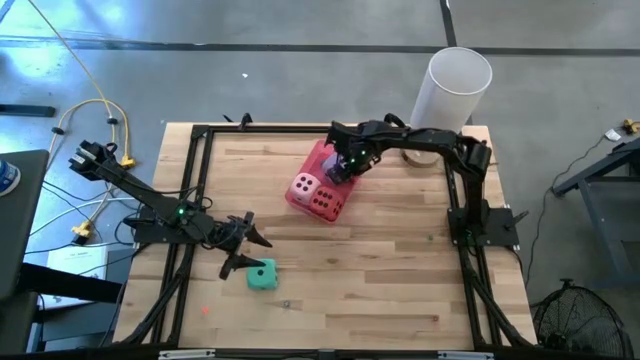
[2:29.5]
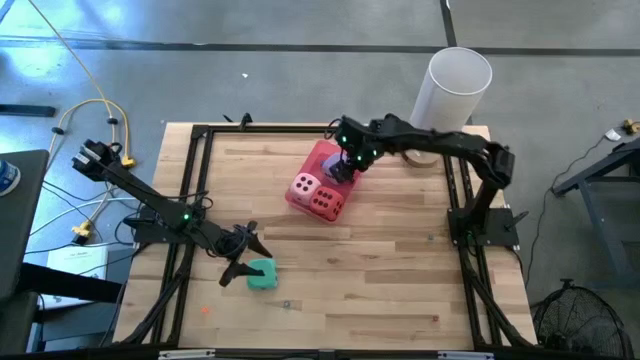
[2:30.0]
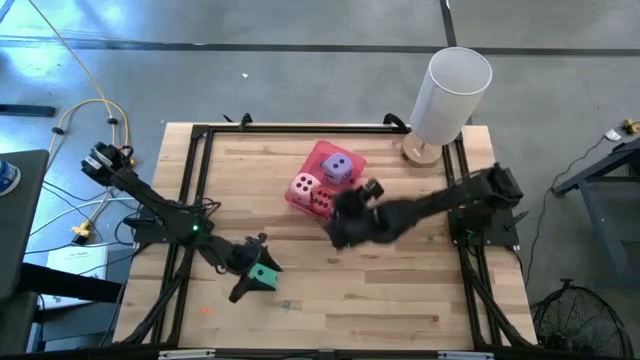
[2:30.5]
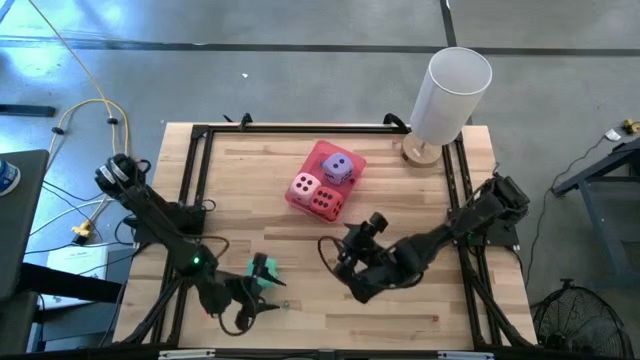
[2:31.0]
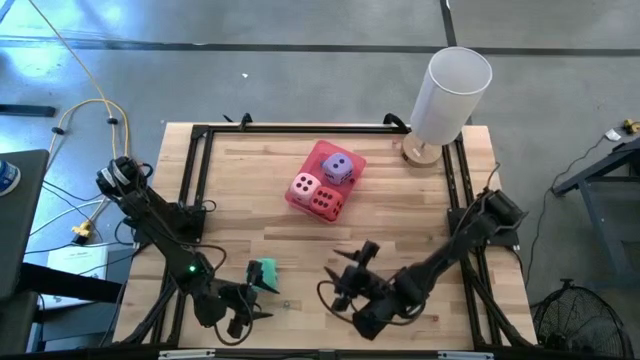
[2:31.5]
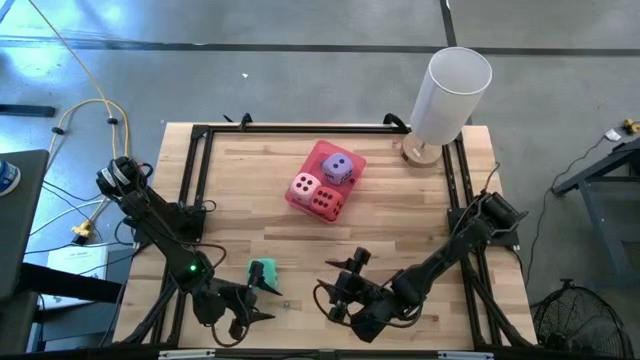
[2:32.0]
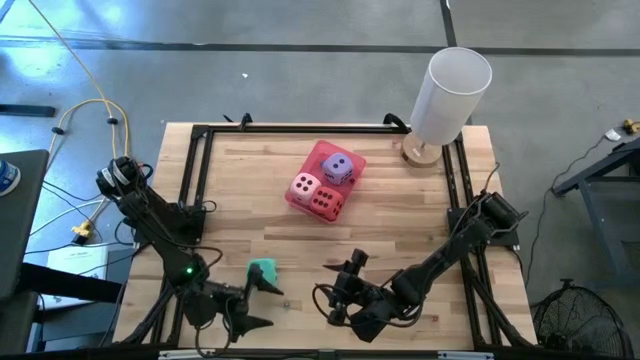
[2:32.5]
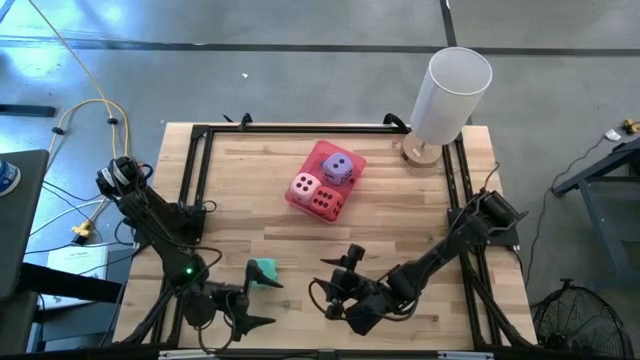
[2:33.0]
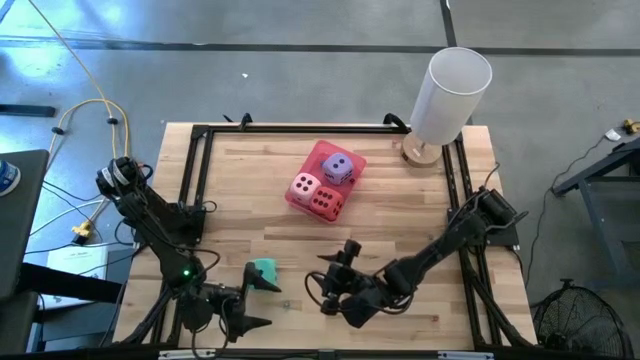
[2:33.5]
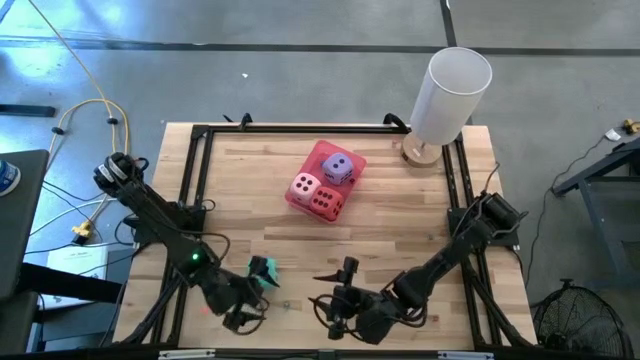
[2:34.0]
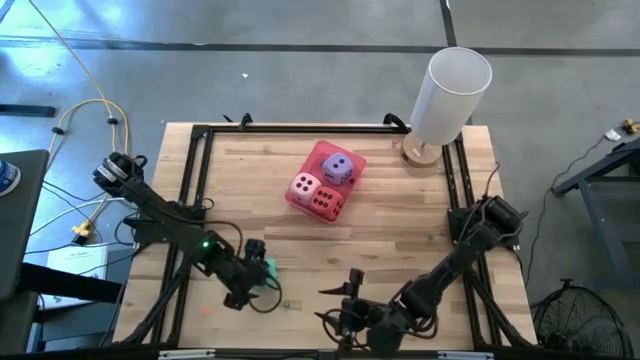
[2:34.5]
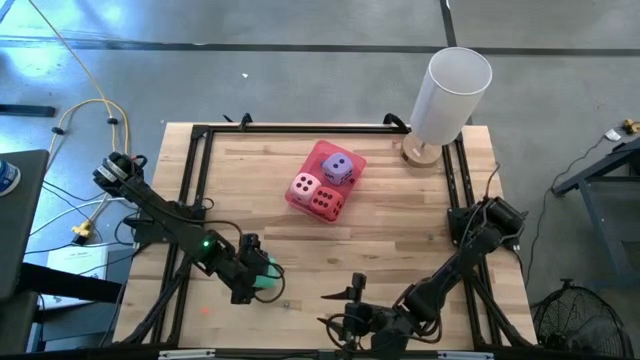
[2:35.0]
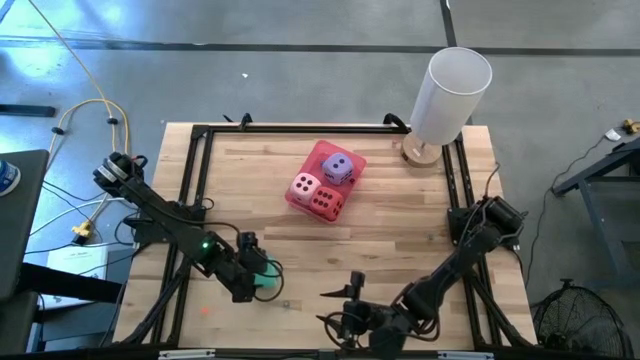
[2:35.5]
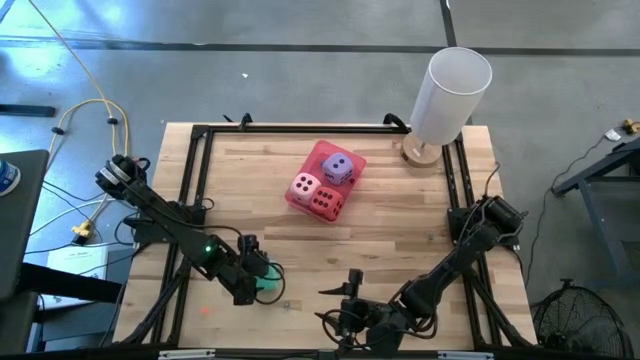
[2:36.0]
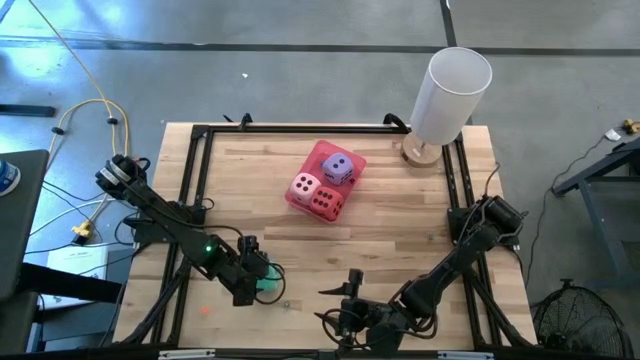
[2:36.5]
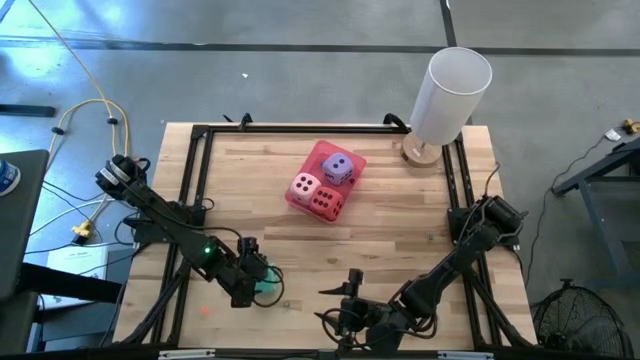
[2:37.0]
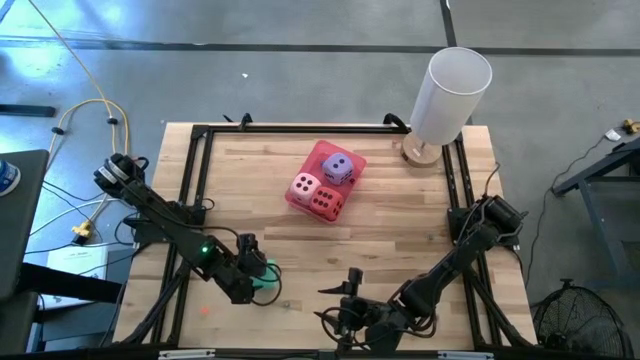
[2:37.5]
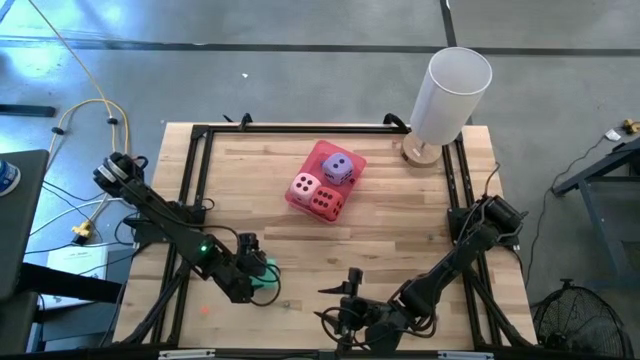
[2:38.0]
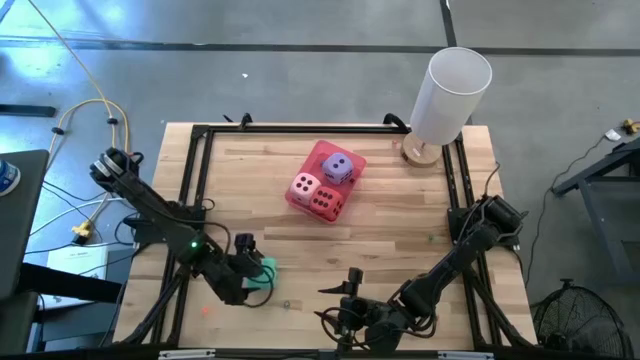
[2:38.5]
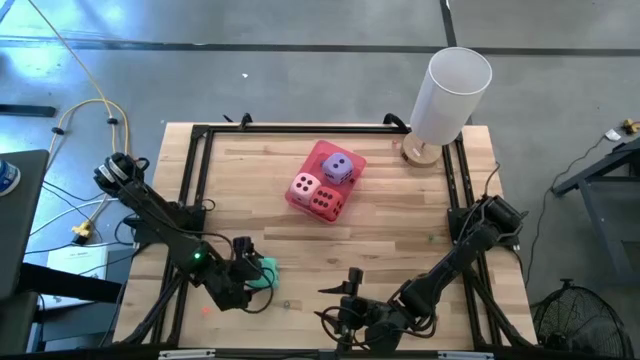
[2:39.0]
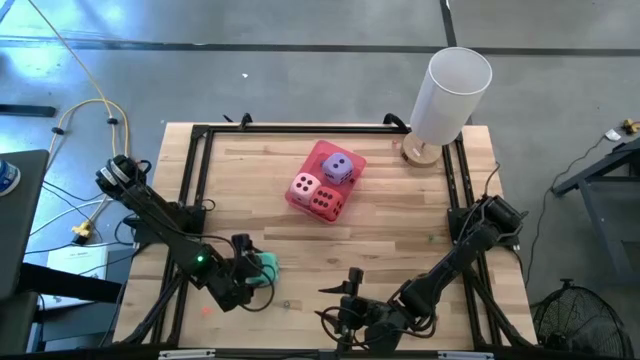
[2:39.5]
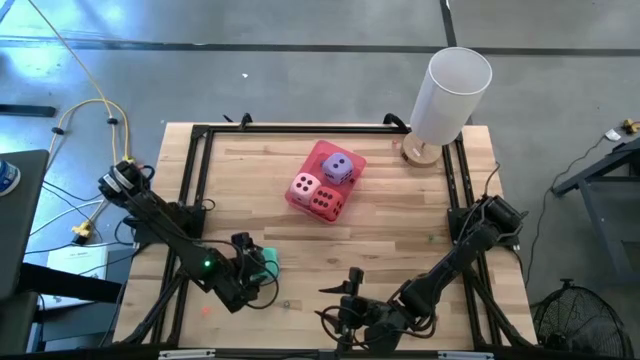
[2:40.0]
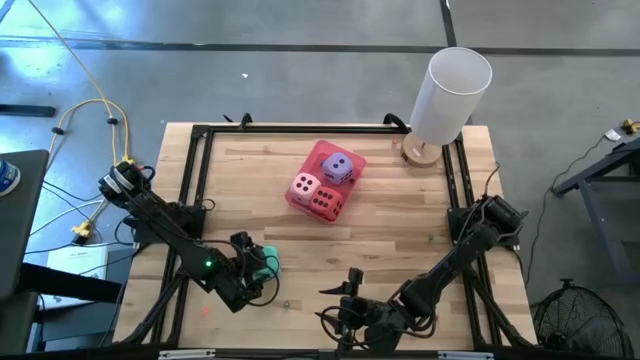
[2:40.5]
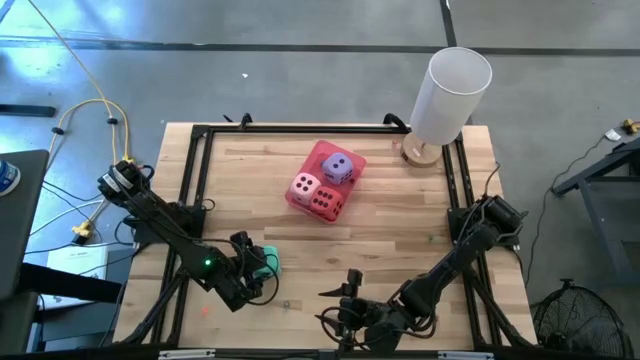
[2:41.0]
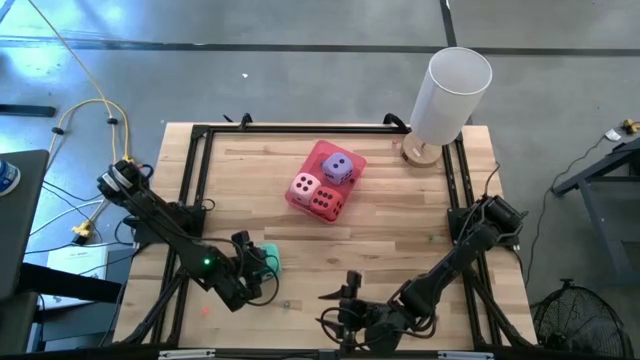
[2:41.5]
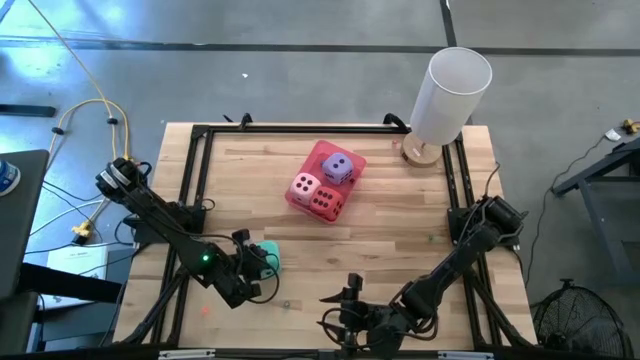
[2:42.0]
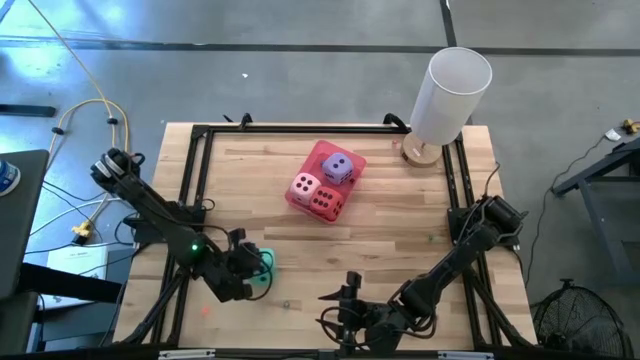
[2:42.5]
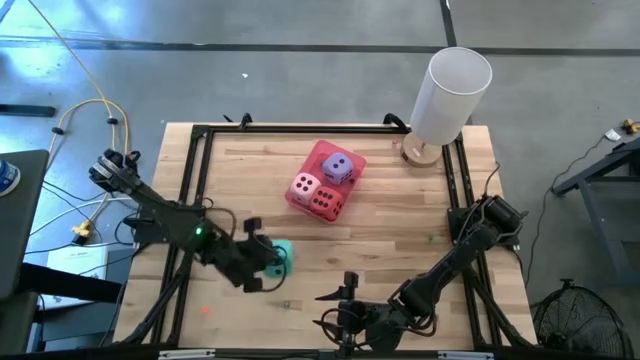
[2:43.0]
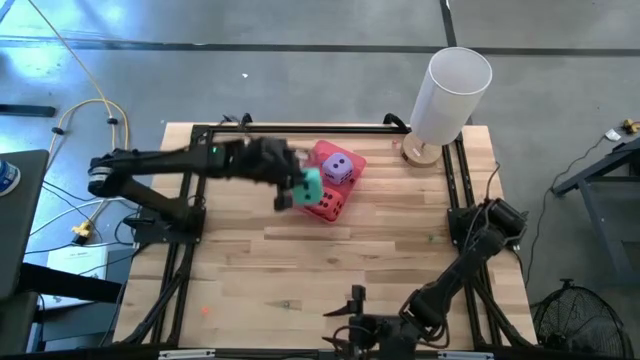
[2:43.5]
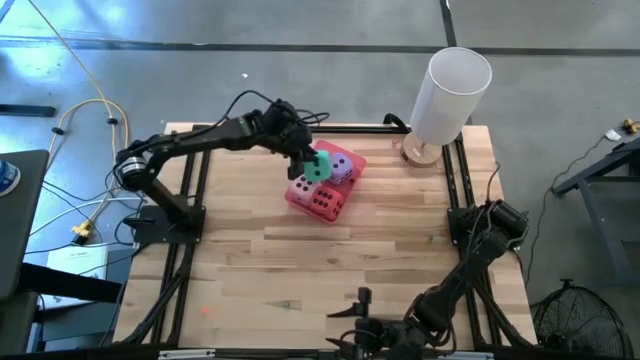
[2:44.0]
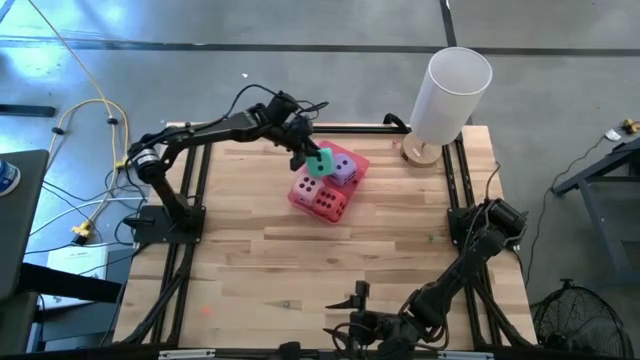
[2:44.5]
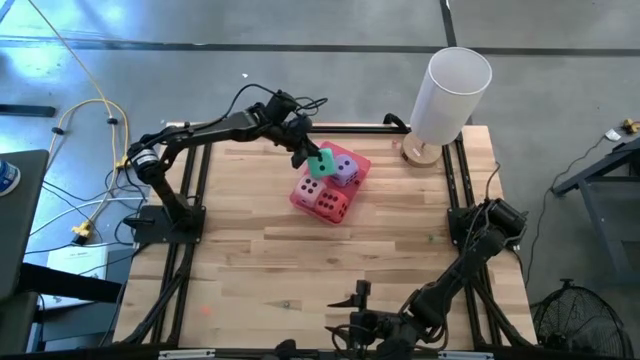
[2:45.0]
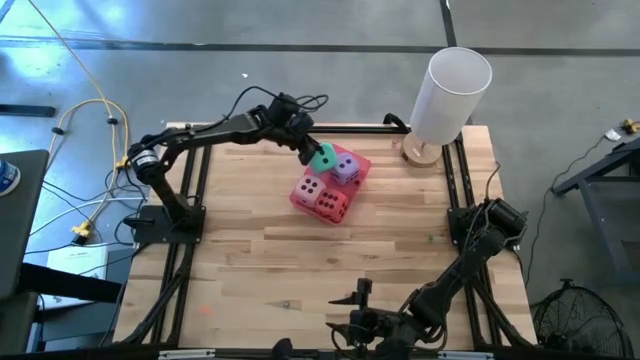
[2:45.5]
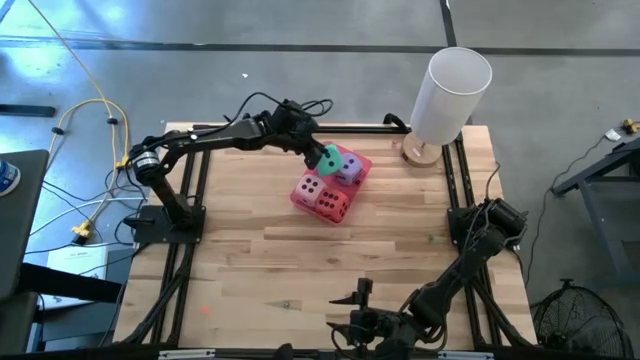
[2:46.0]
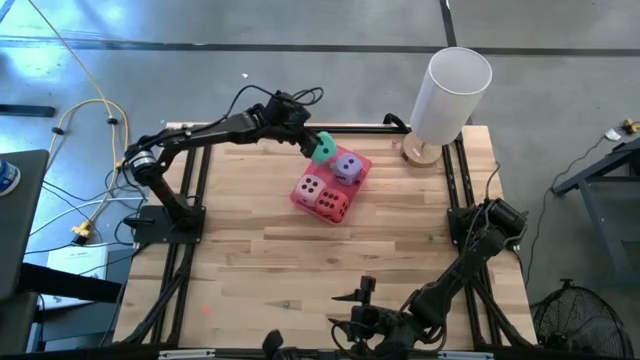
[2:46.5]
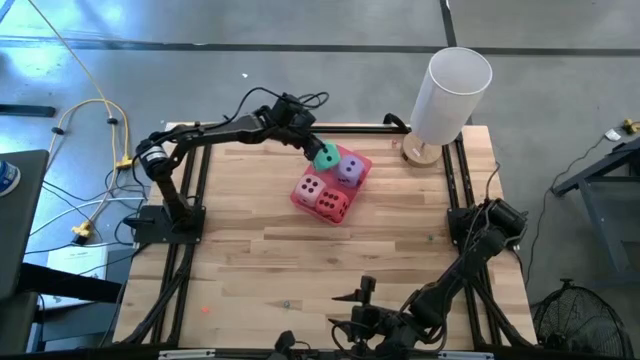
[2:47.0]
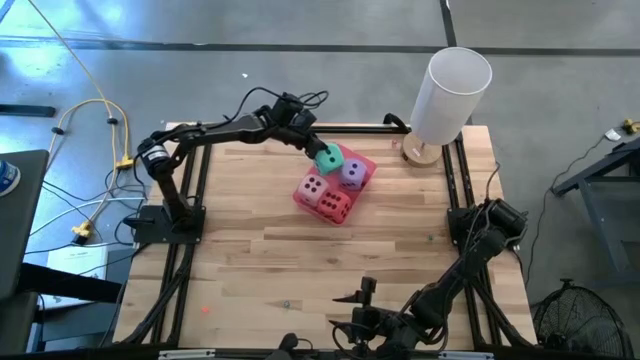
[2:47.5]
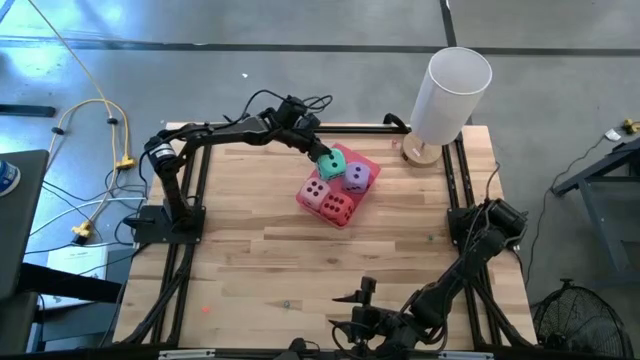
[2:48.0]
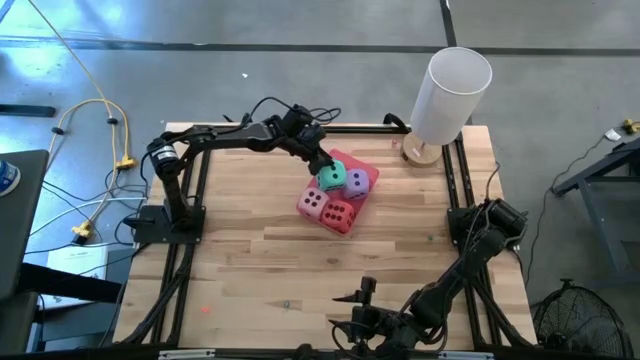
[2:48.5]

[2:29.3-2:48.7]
Task: Pick & Place Dice
Put the large light blue die into the red bin
